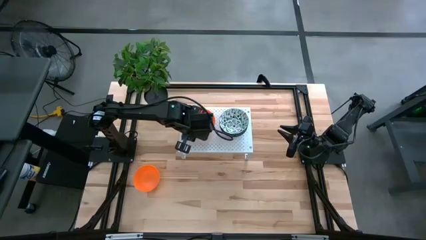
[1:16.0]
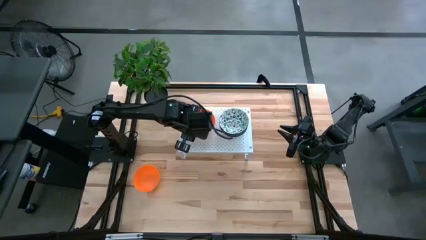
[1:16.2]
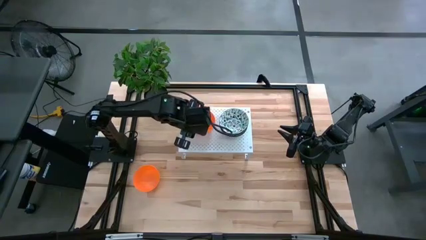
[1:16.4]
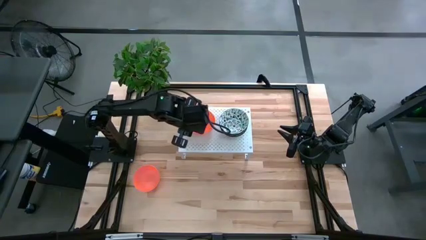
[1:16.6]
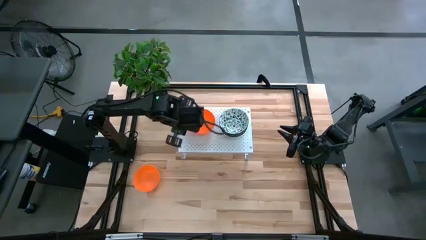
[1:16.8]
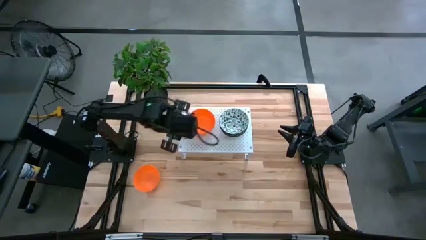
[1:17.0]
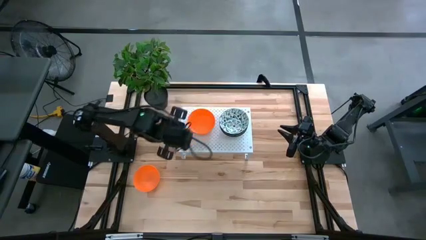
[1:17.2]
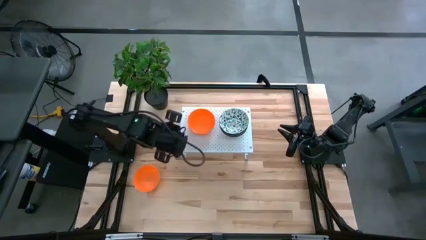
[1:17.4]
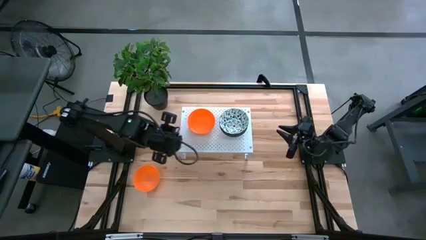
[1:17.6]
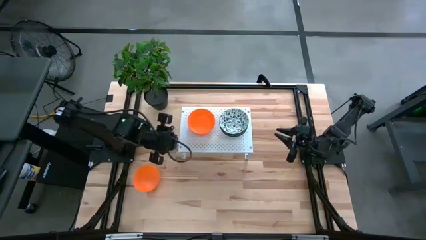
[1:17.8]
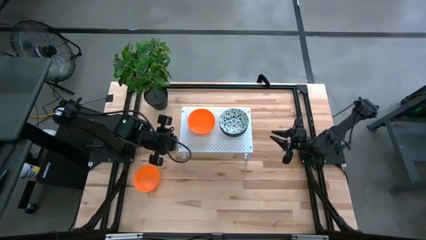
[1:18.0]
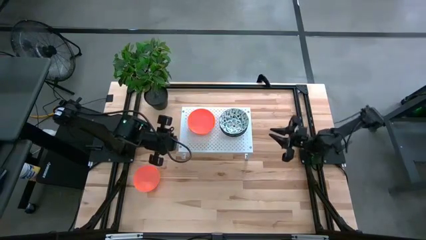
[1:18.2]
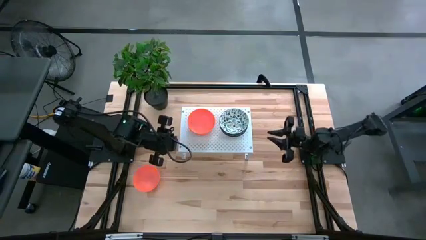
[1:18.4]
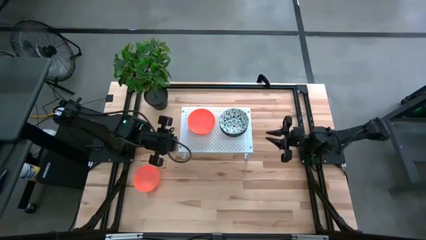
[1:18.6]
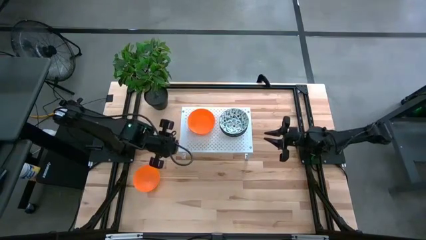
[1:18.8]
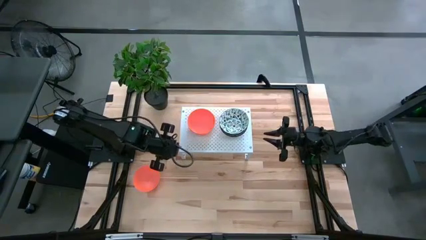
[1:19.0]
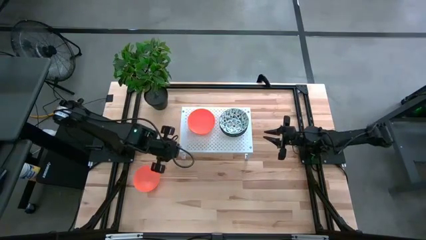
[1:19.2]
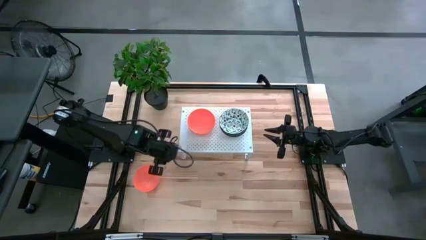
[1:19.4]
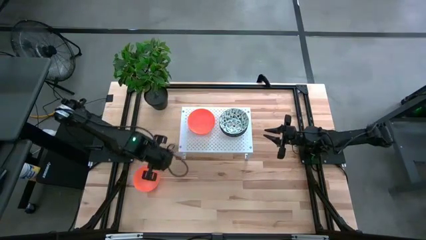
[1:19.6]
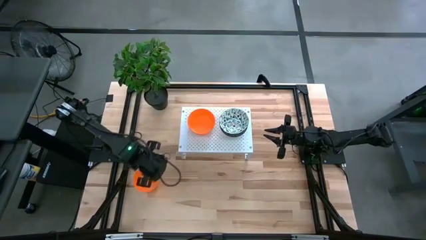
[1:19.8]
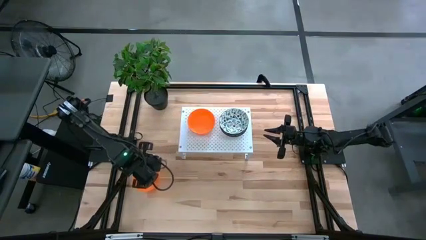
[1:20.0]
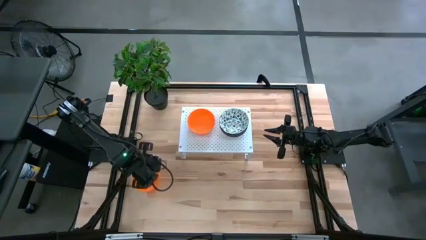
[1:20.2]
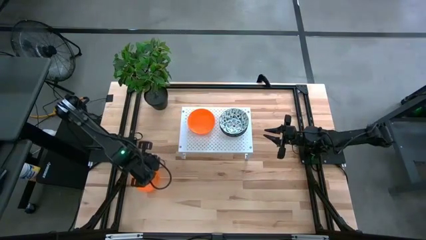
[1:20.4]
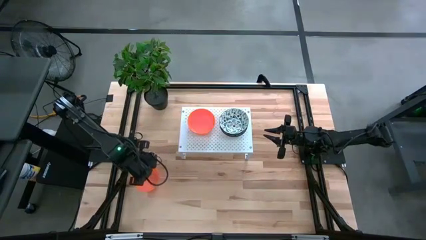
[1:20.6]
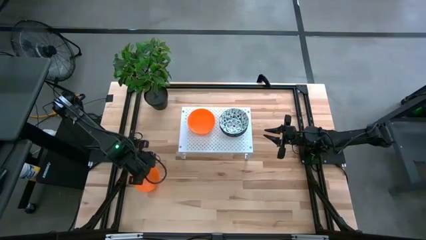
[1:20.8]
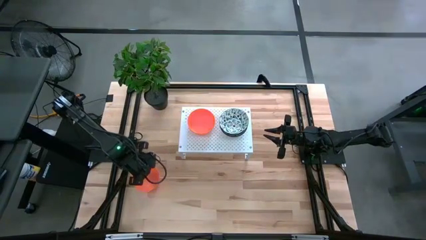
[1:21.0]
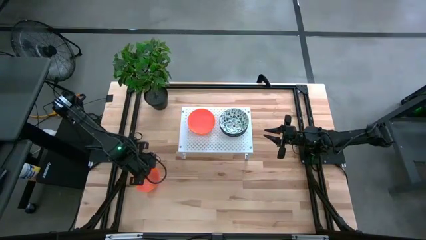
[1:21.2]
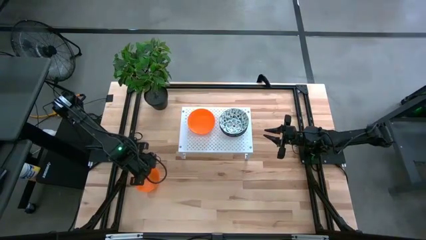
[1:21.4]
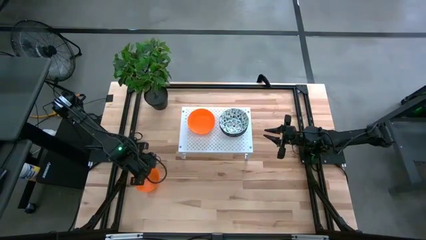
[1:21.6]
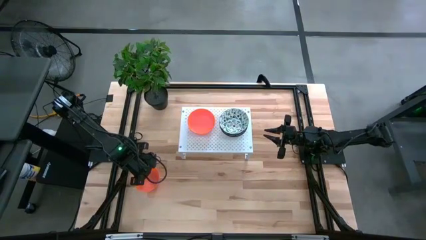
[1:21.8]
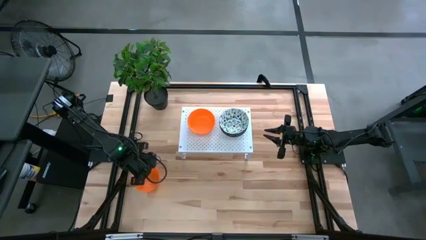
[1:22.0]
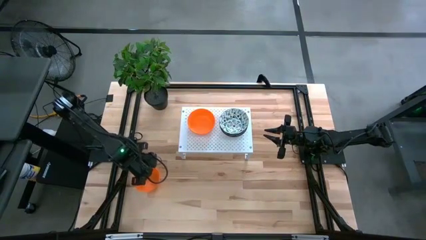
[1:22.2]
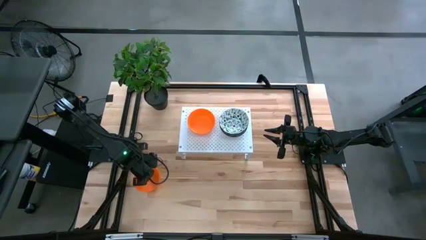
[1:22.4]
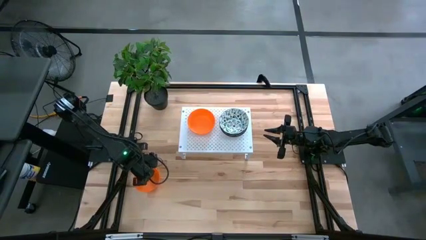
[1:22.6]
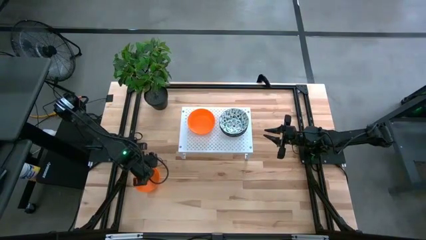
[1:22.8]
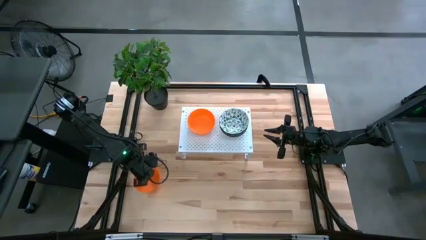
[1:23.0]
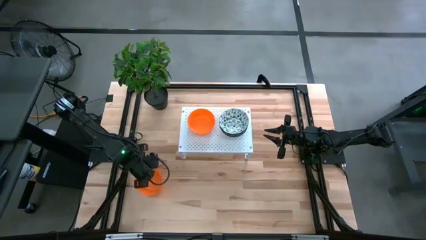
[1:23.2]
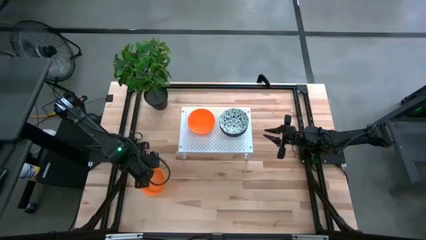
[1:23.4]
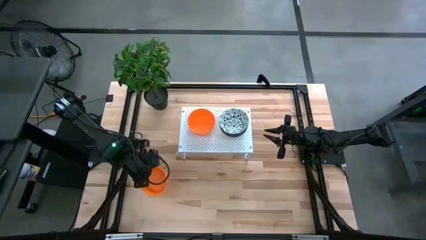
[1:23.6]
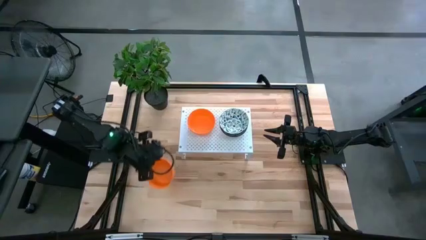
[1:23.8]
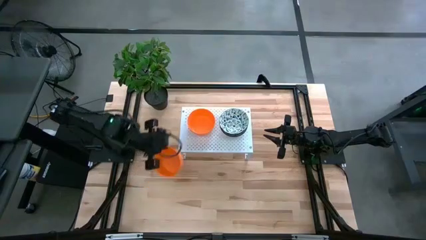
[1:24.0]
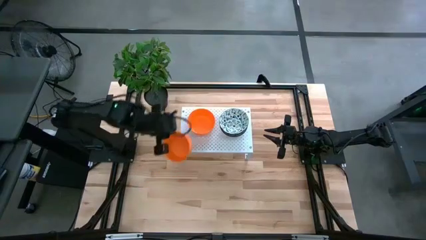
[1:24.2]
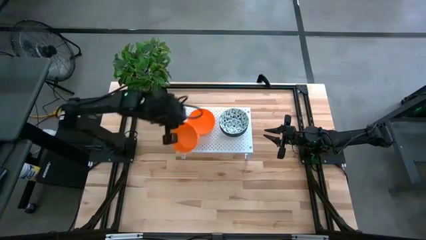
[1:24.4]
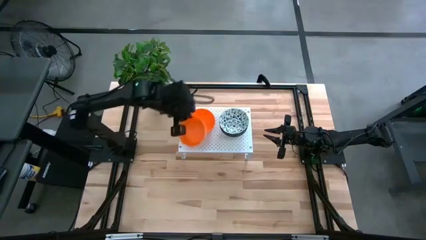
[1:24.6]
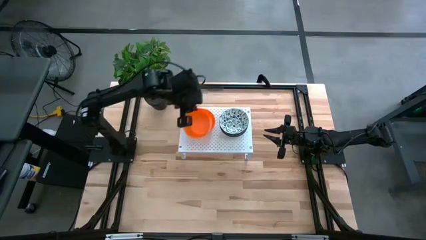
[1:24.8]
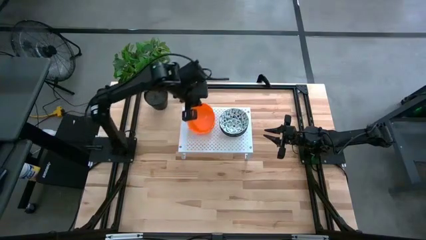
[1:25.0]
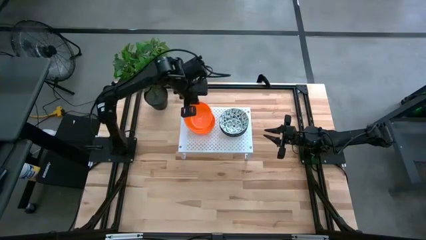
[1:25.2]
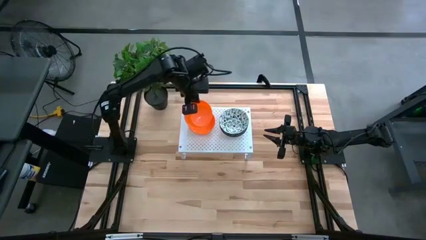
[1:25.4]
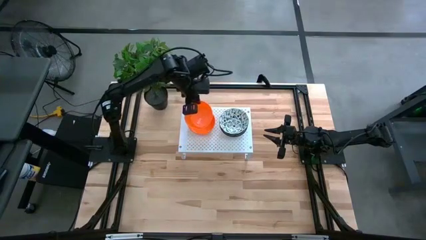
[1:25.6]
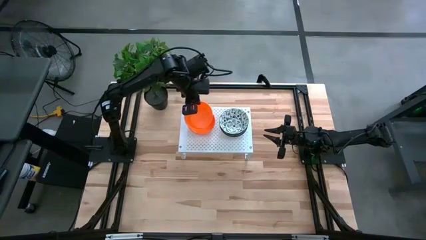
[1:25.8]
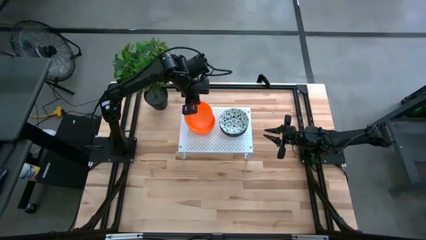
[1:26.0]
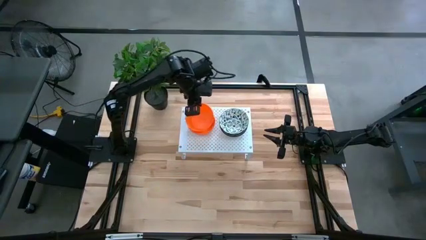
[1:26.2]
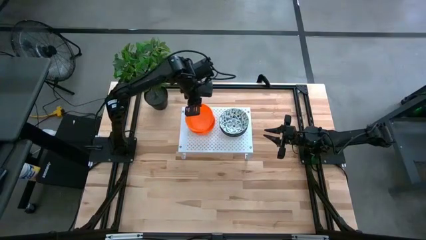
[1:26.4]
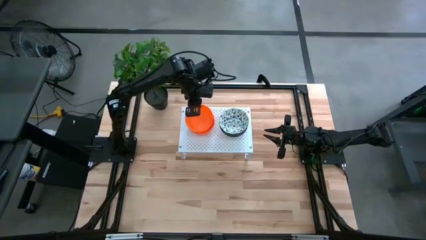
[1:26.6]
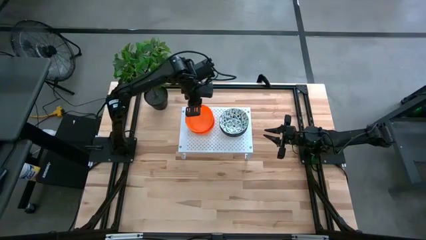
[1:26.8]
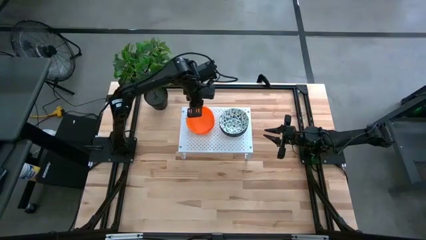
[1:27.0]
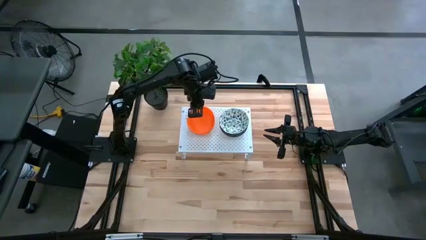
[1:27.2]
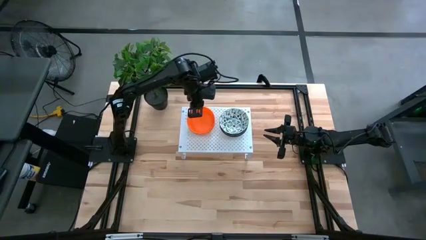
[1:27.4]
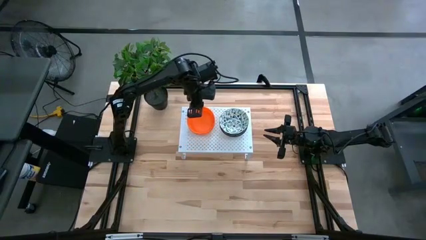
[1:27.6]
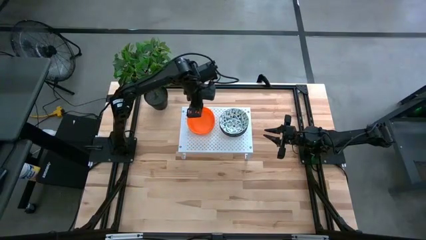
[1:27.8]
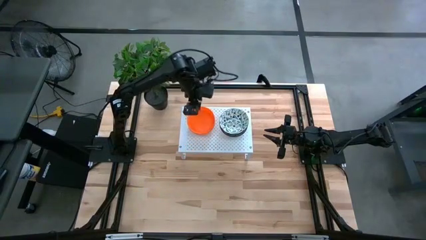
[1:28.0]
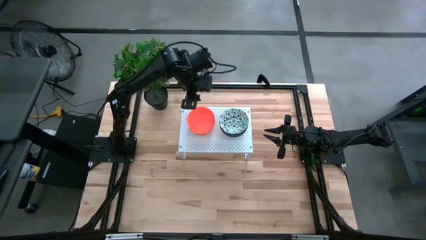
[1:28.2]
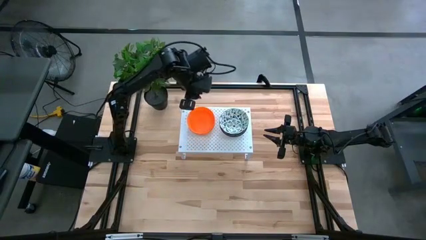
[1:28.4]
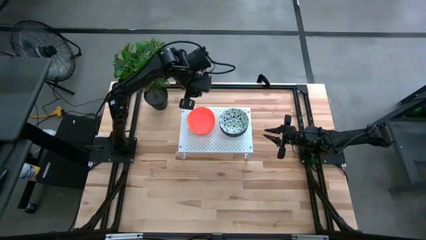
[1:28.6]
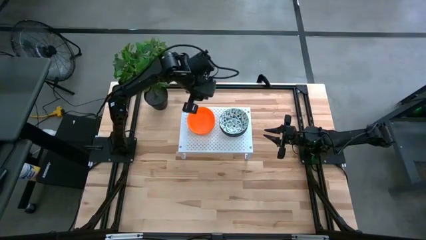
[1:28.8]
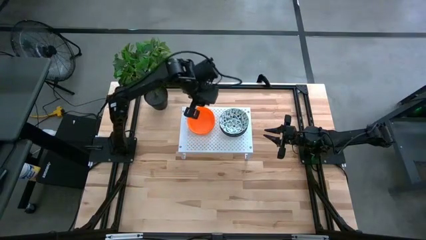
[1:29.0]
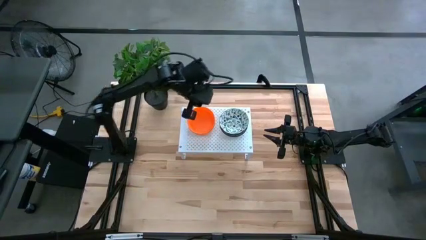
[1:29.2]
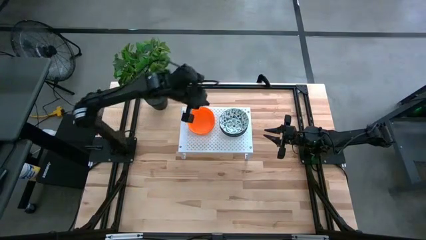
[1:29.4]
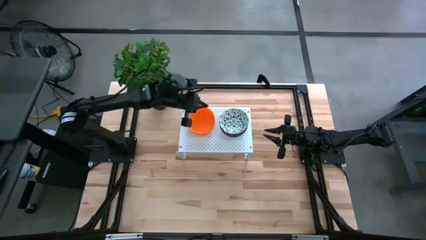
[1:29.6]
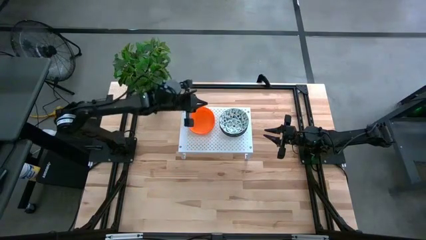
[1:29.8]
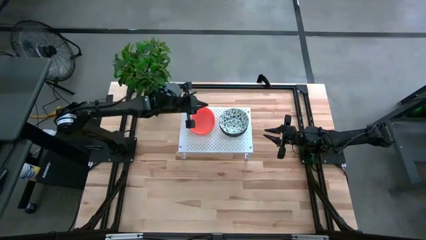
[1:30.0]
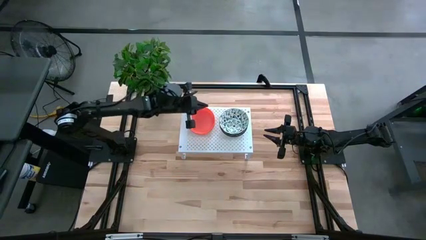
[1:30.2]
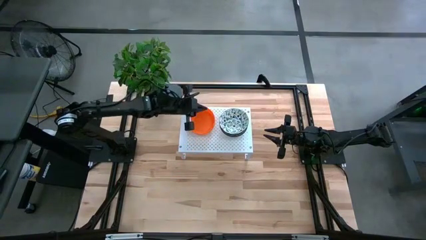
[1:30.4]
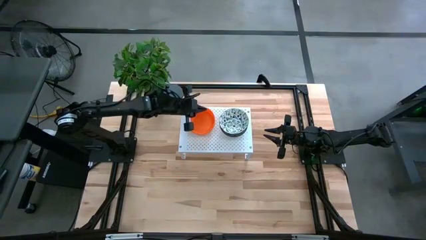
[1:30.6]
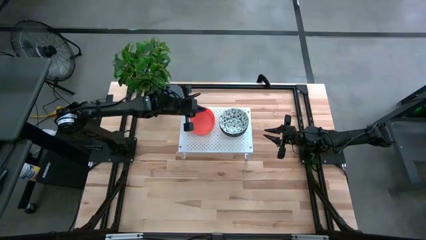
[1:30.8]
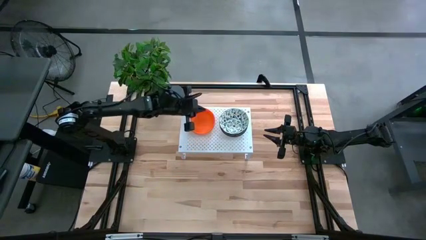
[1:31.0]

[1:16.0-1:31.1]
Task: Pick & Place Mini bowls
Stack the orange bowl on the orange bowls on the shelf

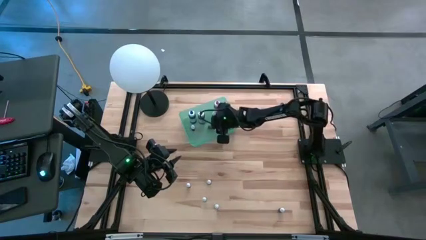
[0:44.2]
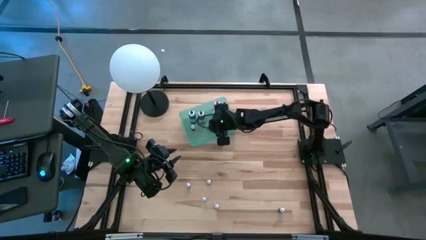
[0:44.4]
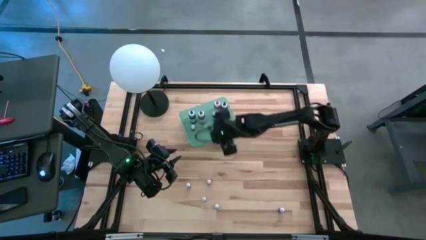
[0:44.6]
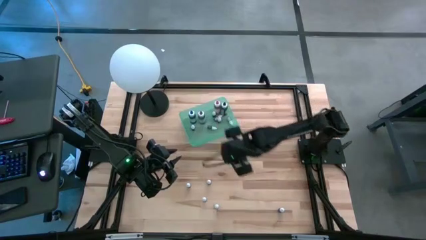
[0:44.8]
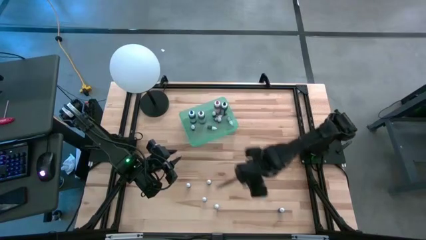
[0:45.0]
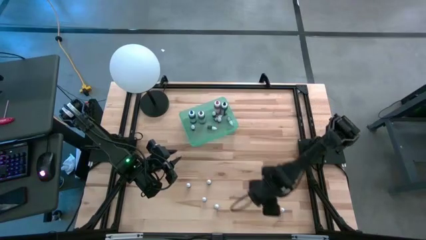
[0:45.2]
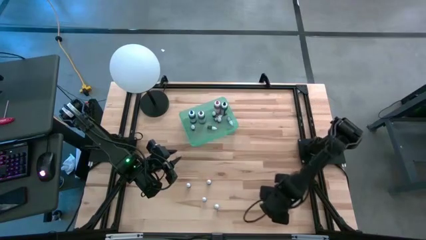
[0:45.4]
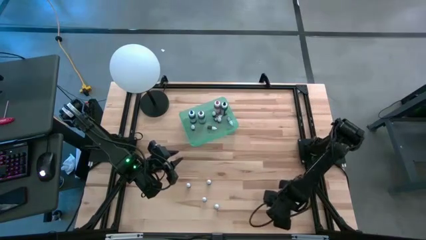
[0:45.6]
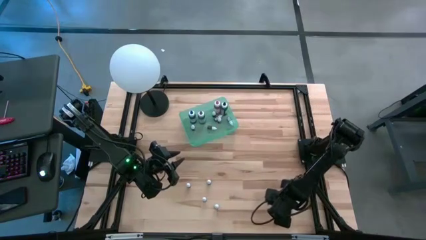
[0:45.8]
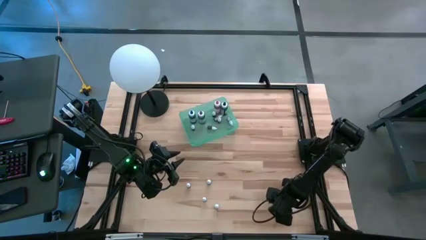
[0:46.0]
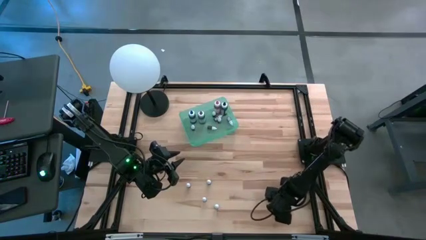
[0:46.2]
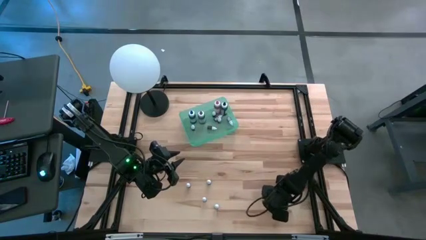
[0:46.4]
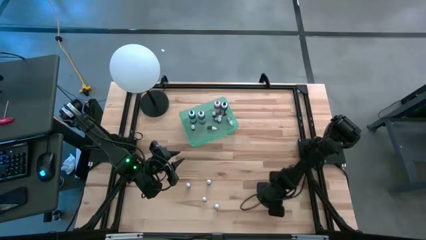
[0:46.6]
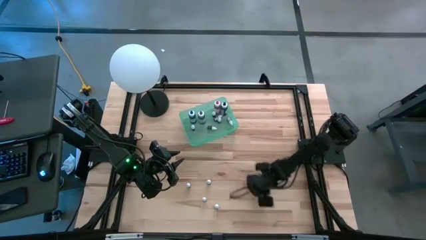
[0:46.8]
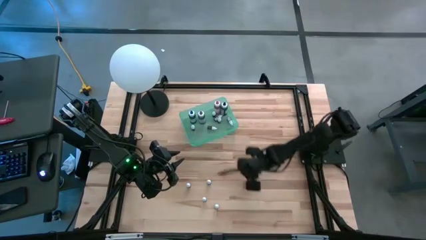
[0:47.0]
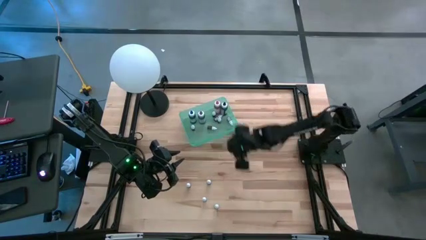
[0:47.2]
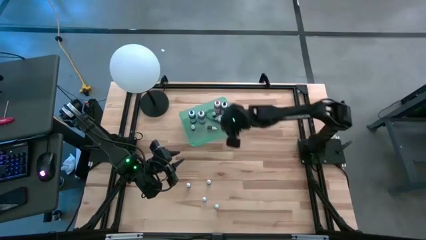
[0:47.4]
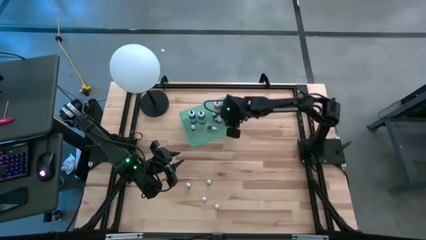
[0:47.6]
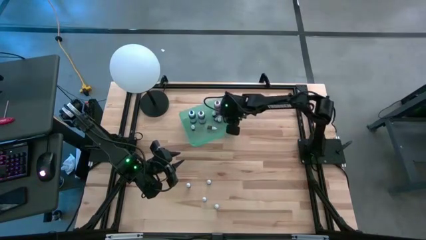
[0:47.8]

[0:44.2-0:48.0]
Task: Pick & Place food coloring
Put the small purple bottle into the blue bin
